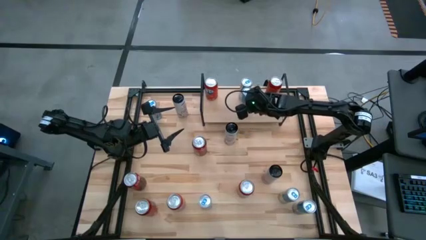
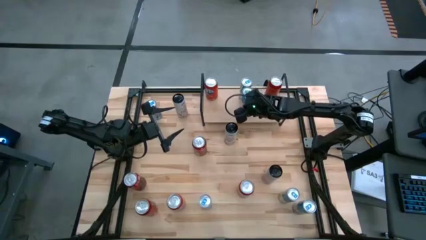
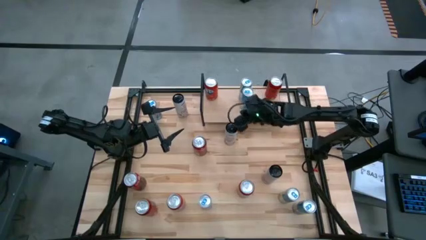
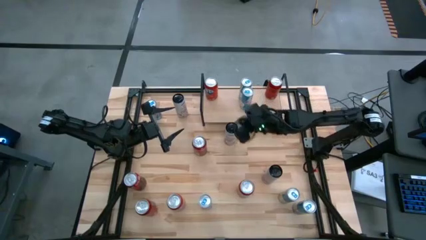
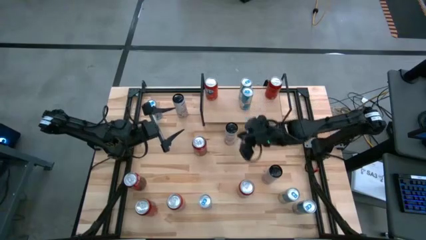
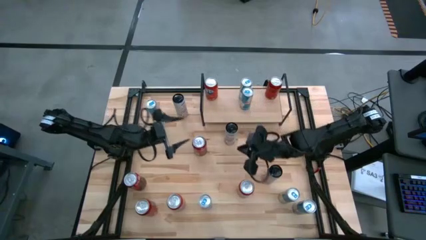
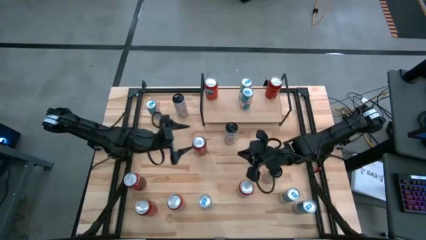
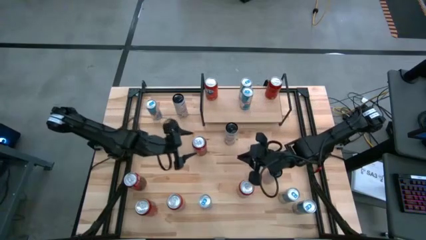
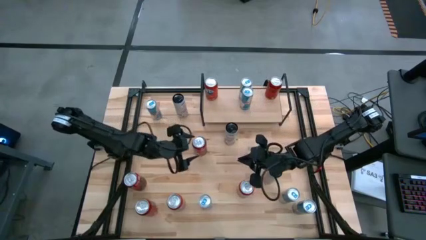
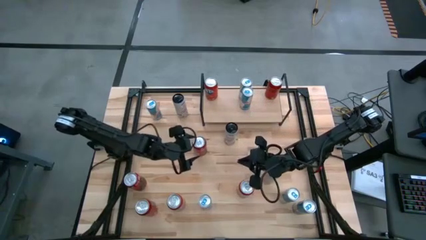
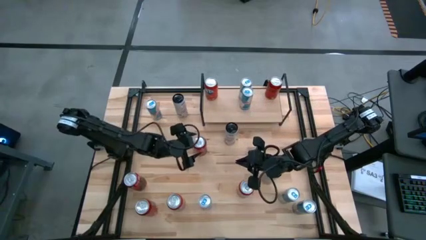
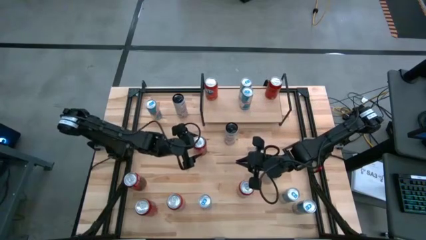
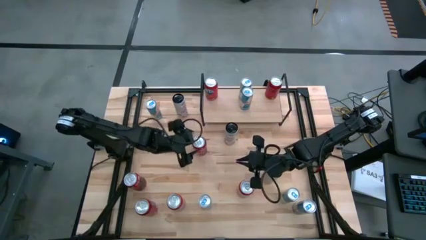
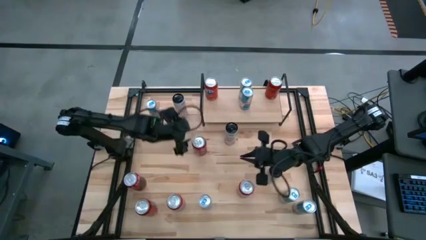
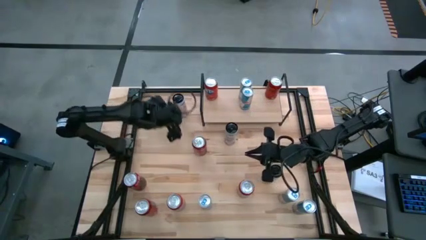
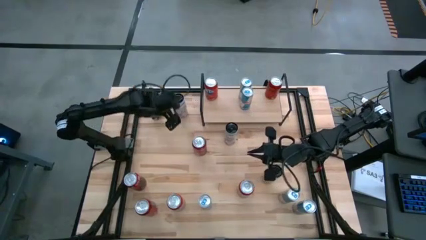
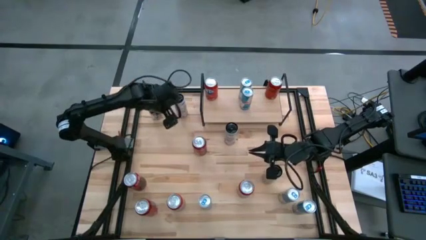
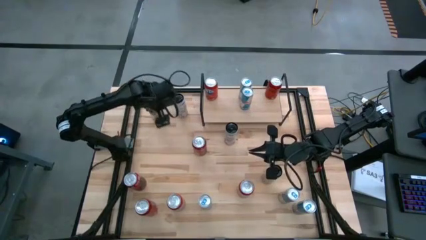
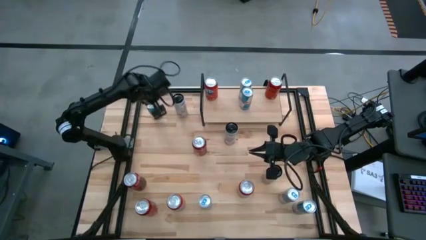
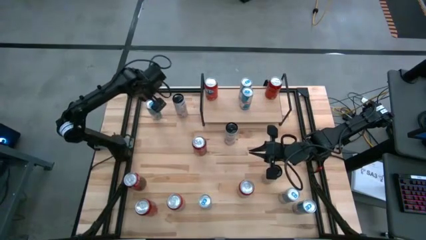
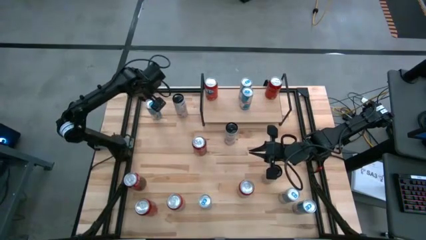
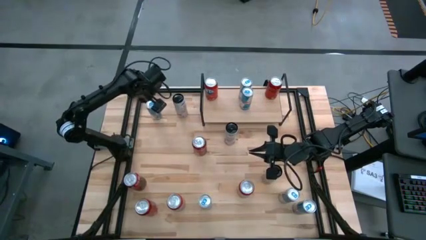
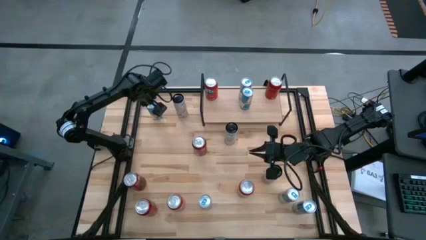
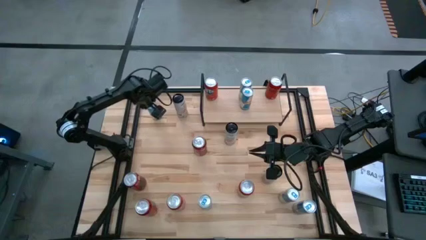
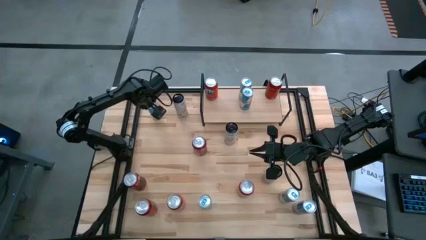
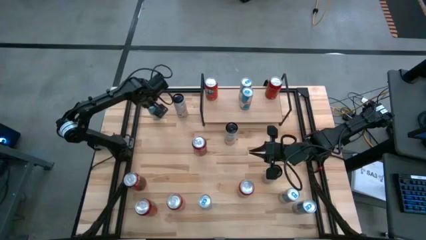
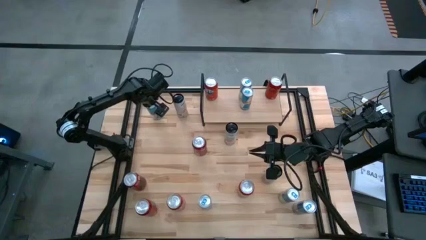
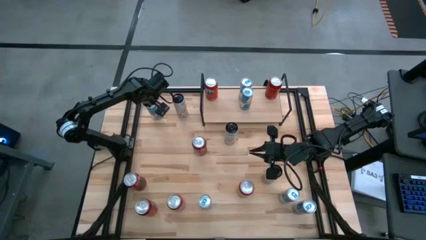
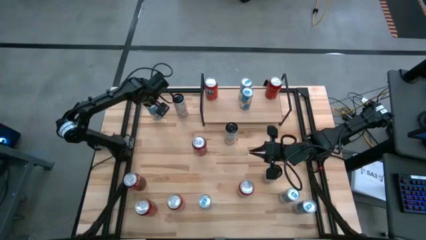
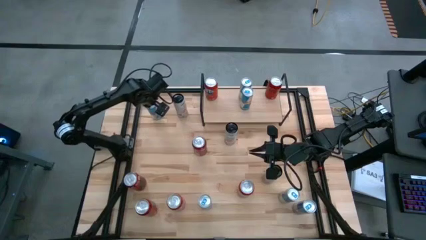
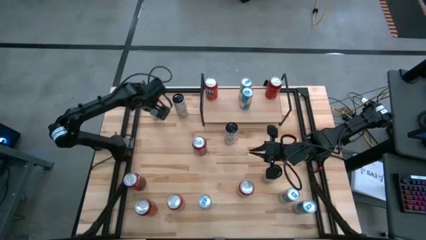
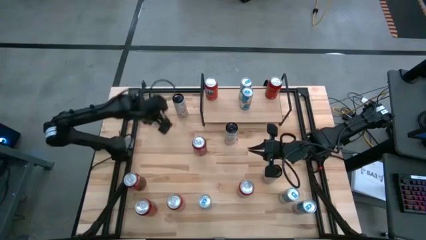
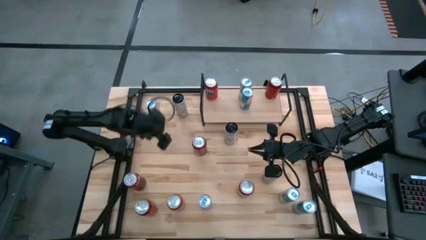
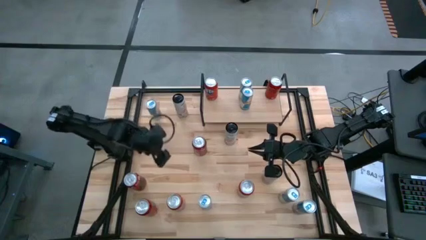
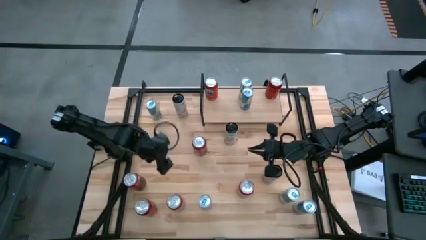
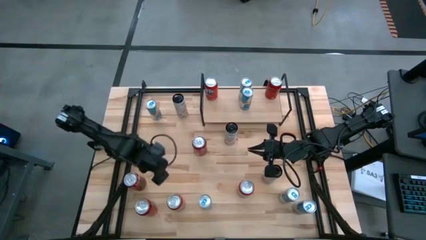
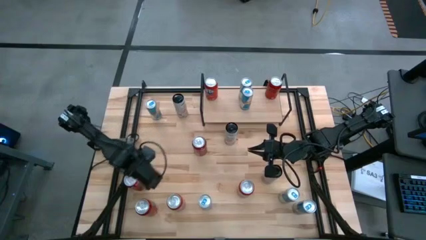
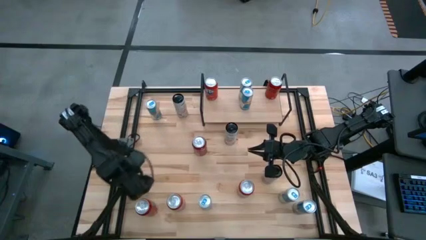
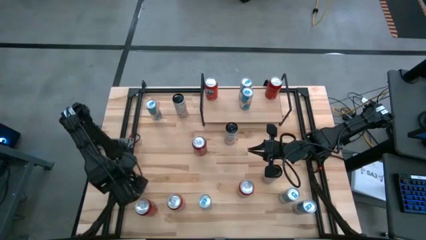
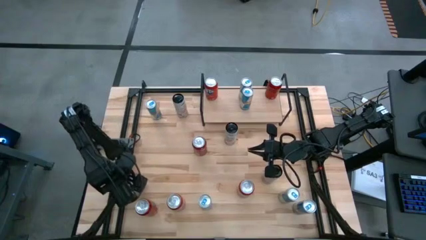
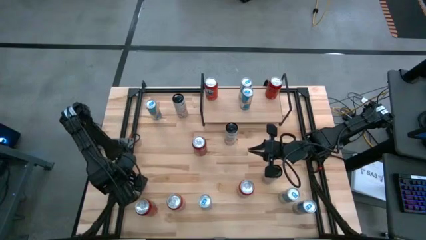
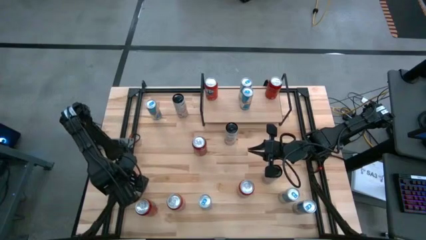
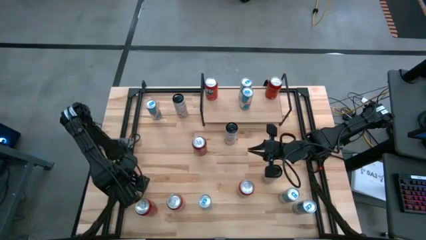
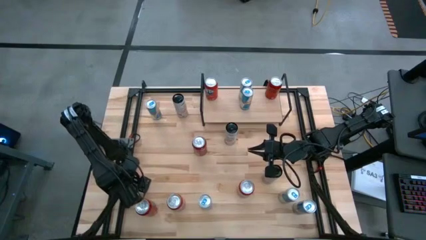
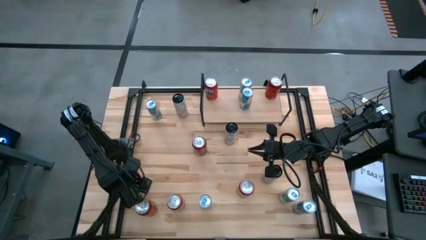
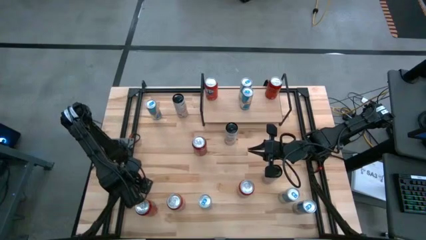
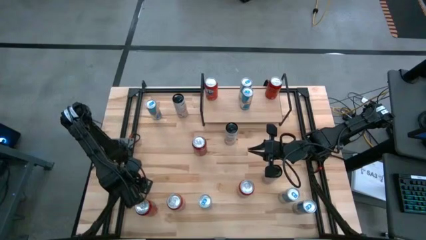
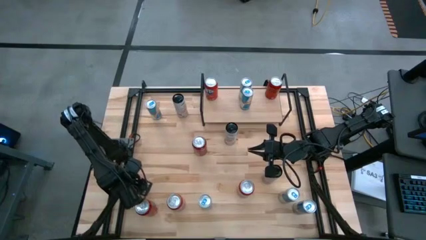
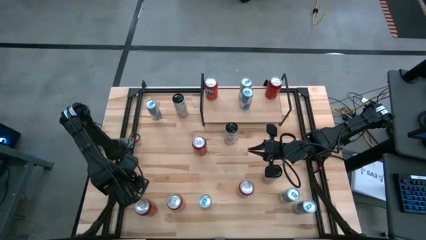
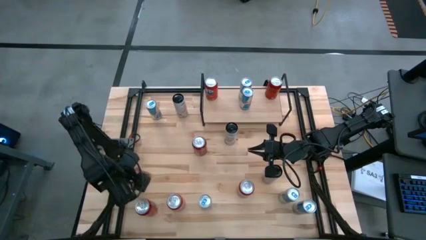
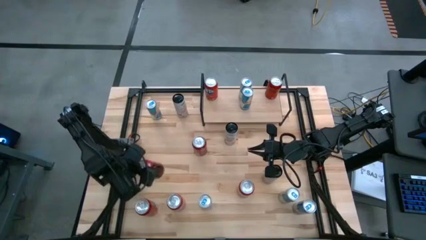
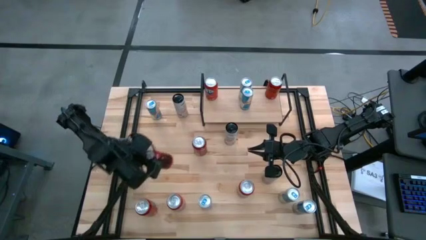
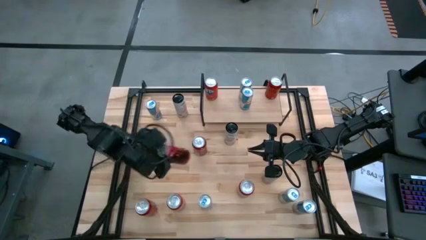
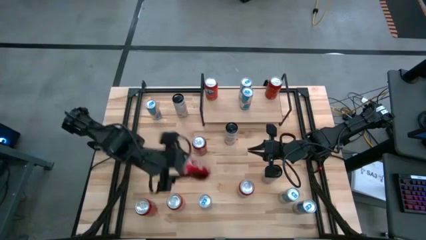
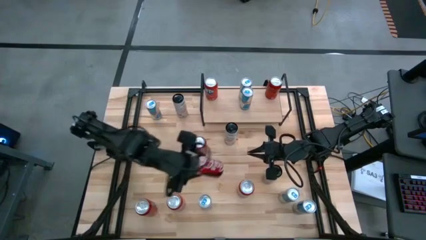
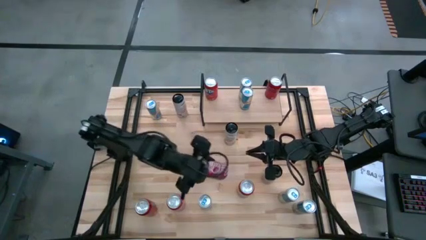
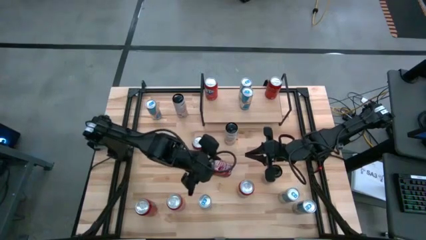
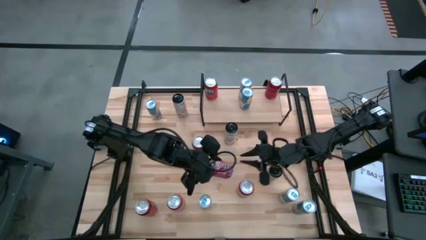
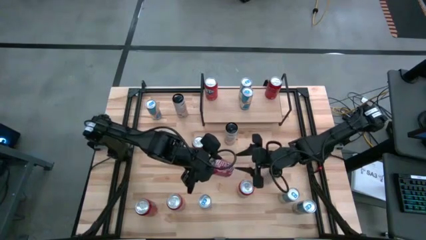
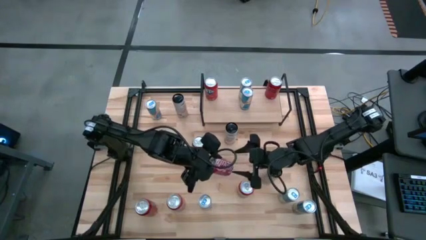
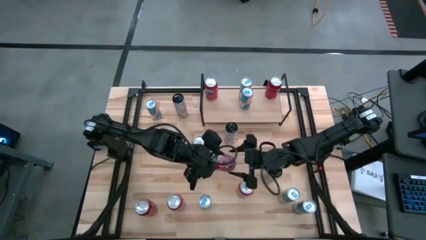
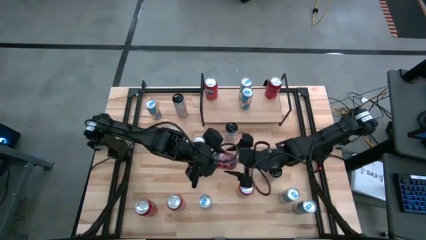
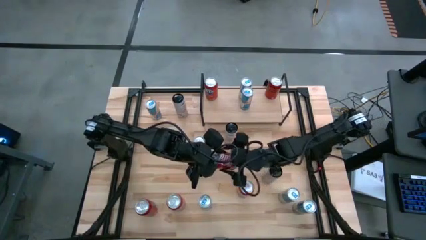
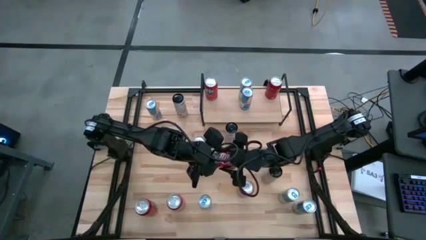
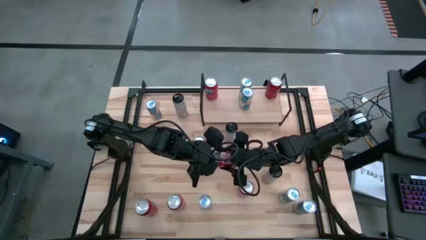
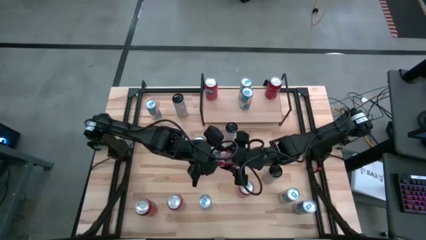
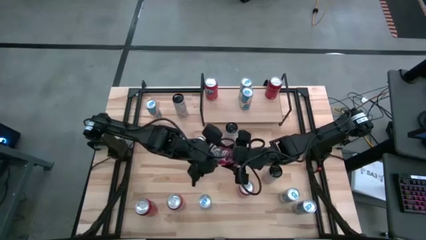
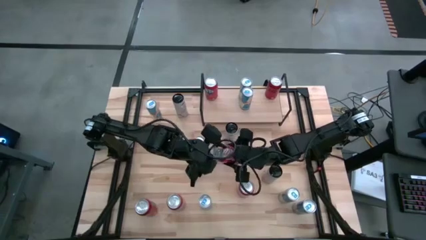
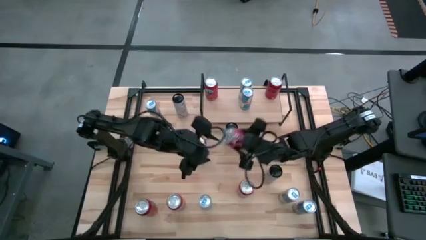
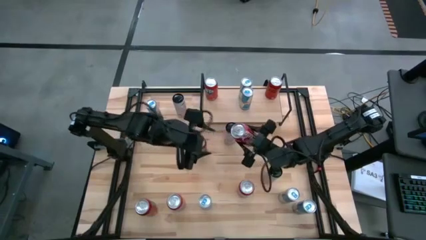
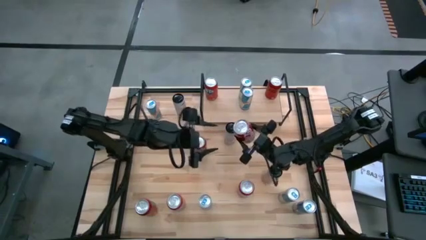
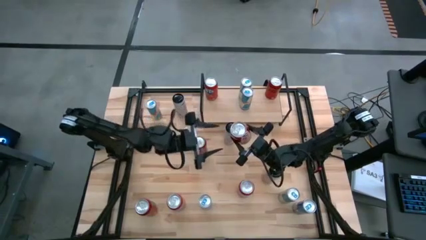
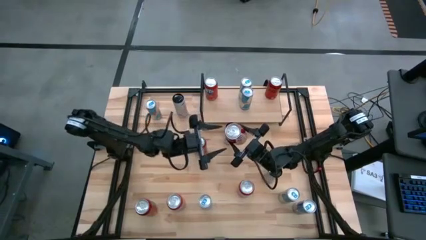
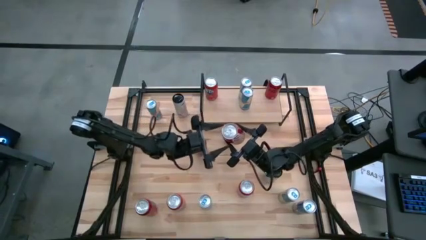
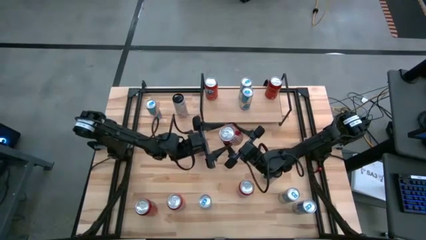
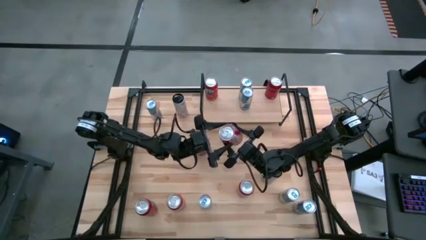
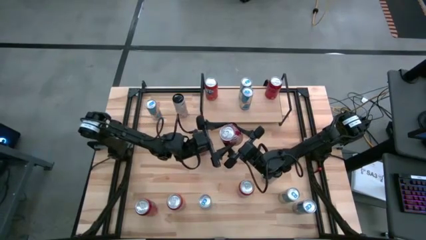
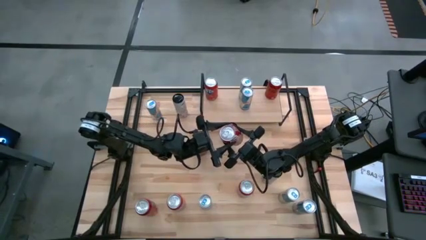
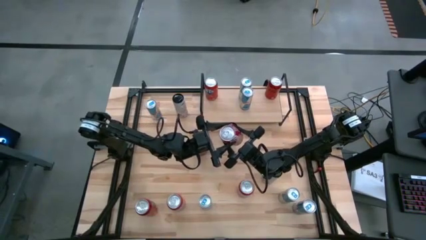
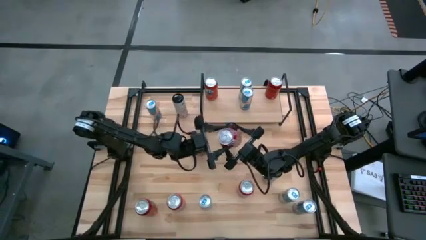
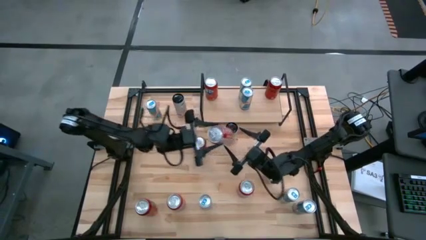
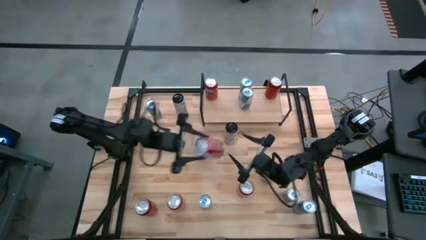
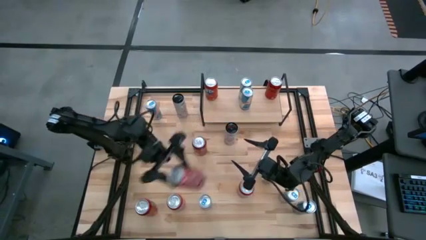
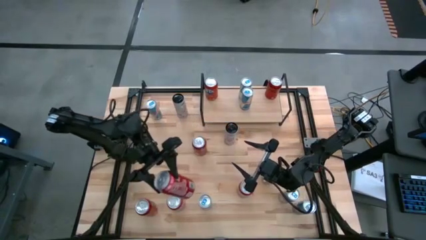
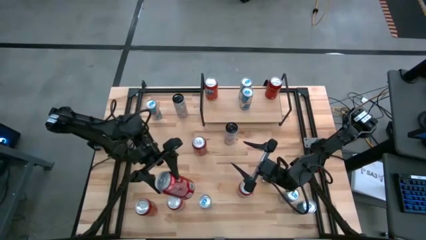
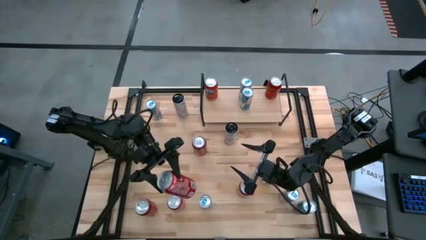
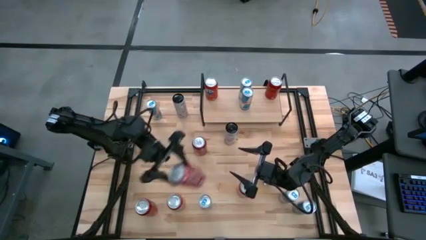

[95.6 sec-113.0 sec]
Task: Place canned beverage on shelf
Put the red soda can on the shelf
